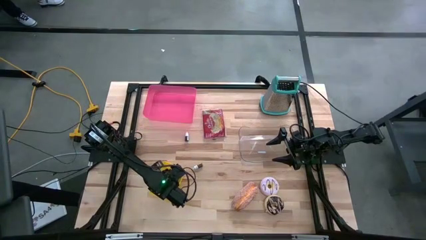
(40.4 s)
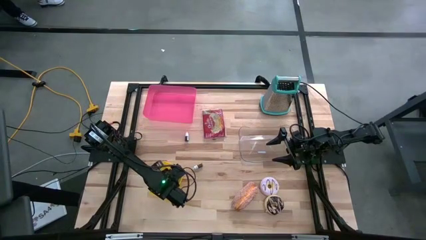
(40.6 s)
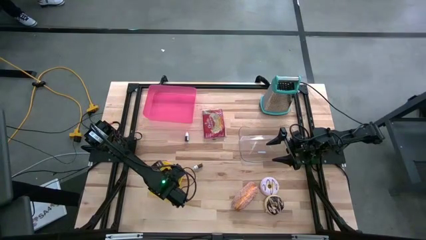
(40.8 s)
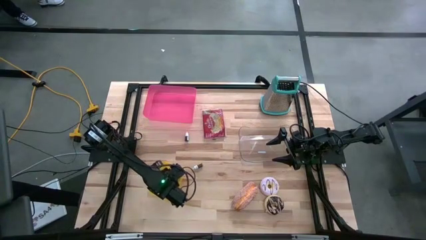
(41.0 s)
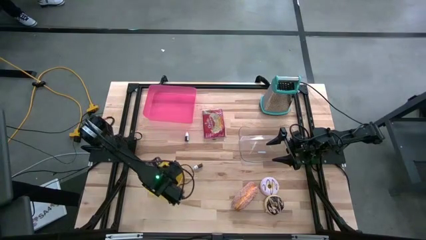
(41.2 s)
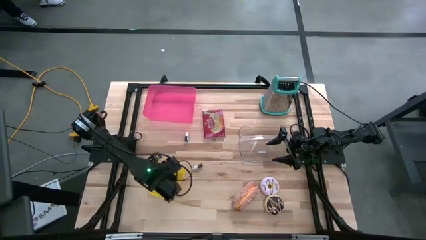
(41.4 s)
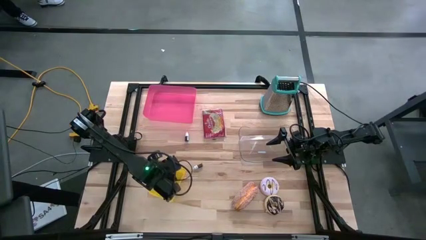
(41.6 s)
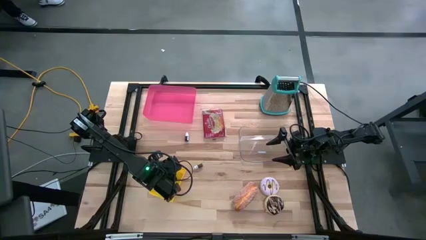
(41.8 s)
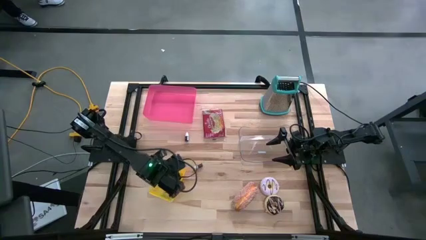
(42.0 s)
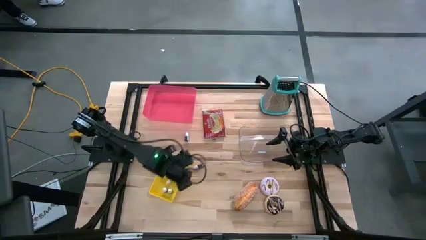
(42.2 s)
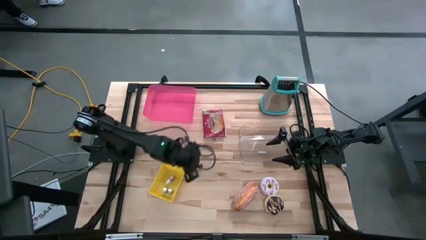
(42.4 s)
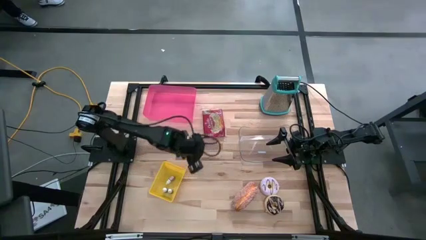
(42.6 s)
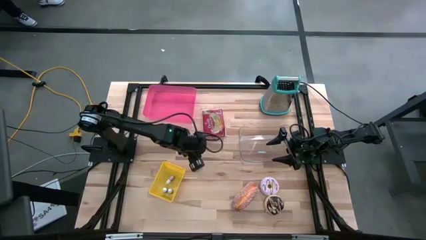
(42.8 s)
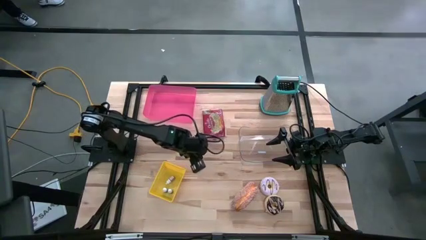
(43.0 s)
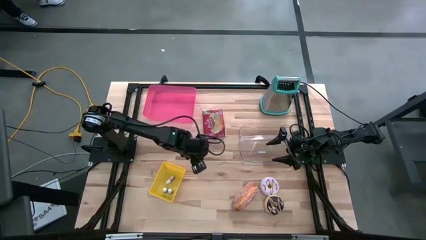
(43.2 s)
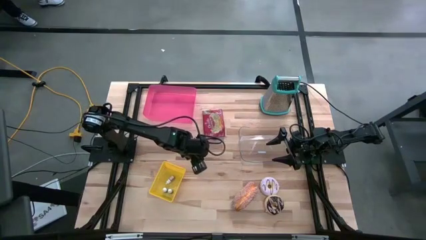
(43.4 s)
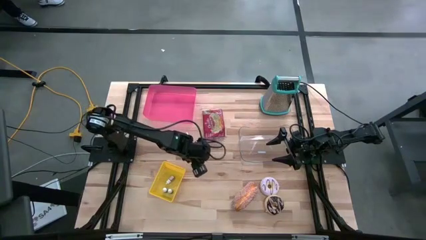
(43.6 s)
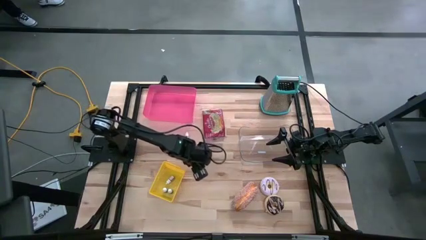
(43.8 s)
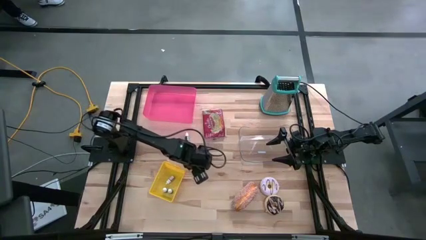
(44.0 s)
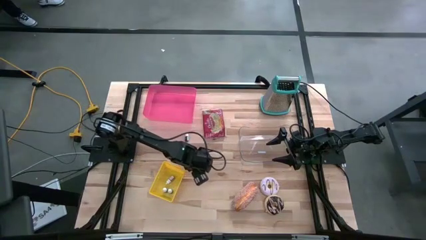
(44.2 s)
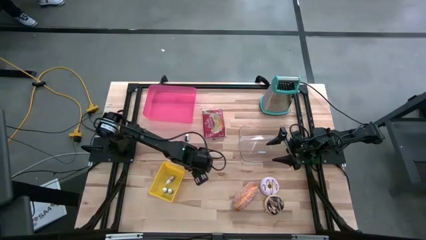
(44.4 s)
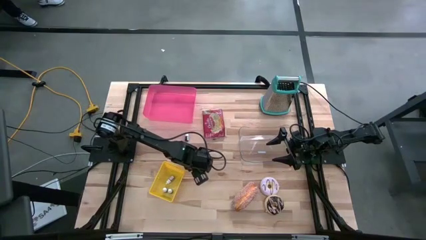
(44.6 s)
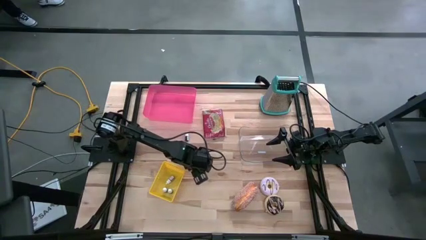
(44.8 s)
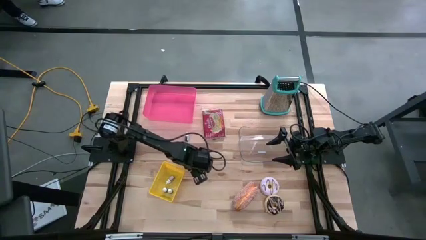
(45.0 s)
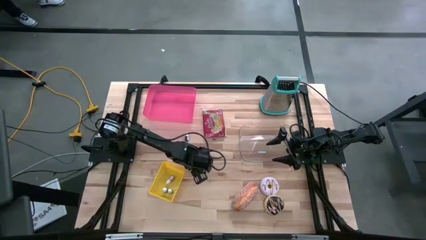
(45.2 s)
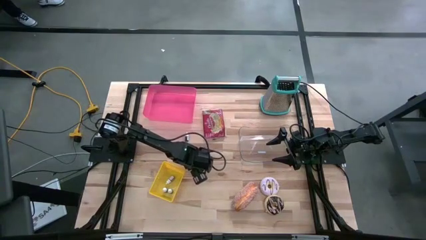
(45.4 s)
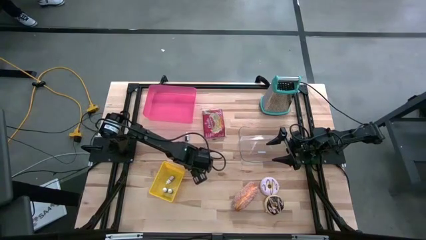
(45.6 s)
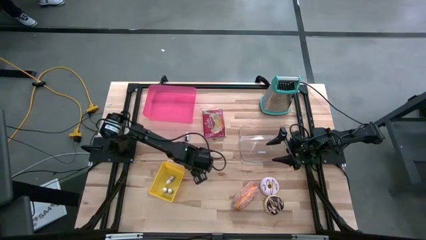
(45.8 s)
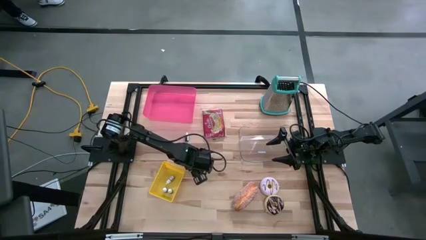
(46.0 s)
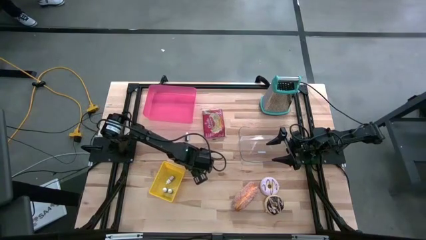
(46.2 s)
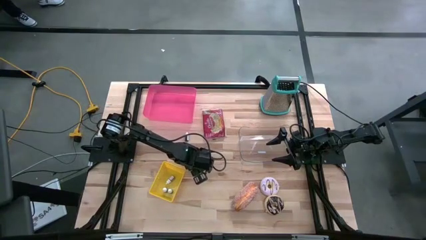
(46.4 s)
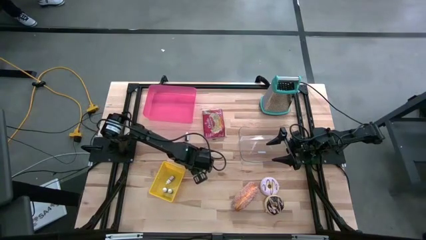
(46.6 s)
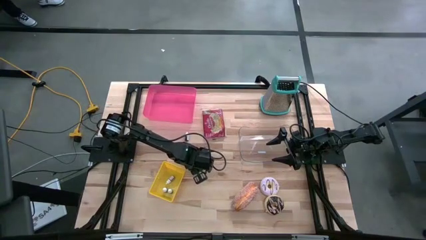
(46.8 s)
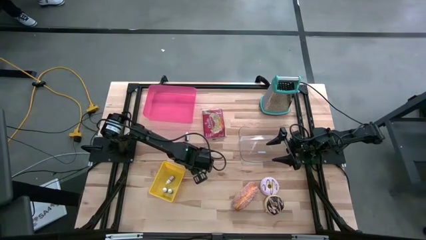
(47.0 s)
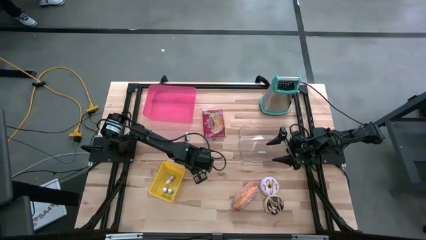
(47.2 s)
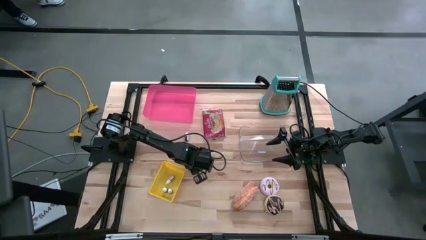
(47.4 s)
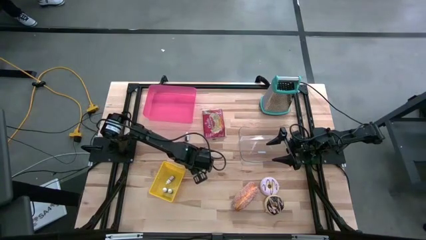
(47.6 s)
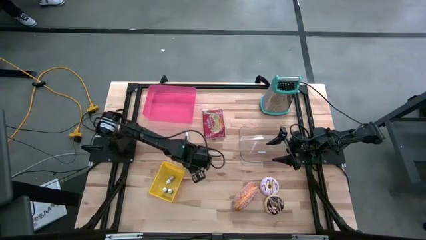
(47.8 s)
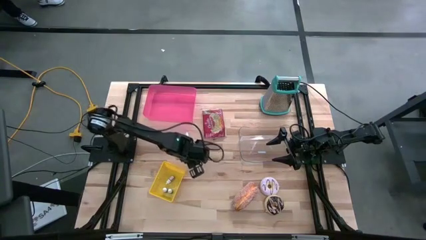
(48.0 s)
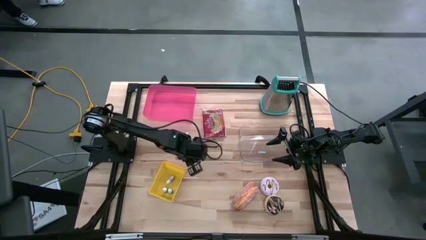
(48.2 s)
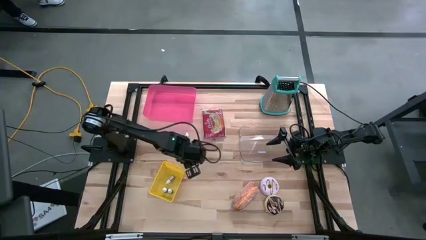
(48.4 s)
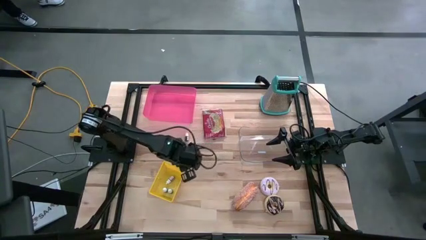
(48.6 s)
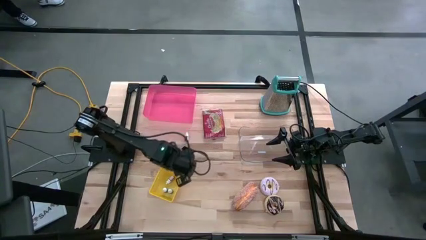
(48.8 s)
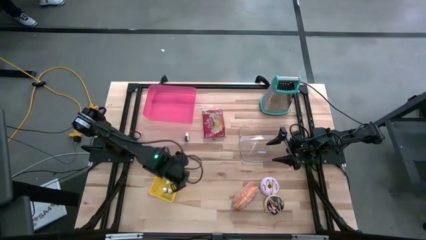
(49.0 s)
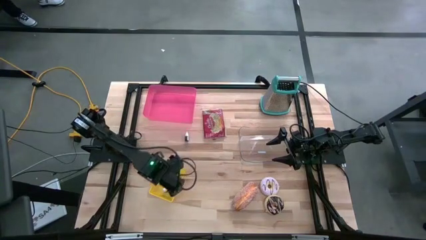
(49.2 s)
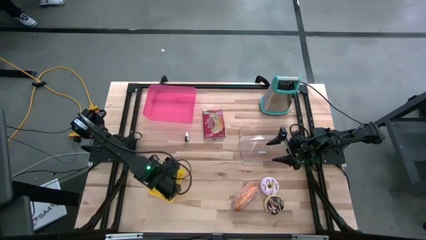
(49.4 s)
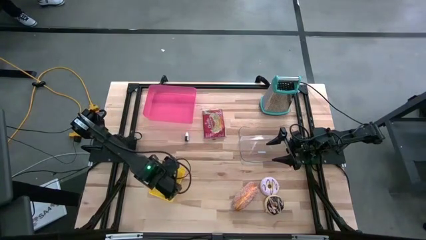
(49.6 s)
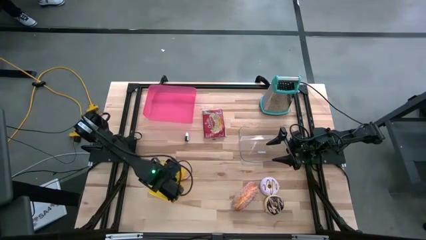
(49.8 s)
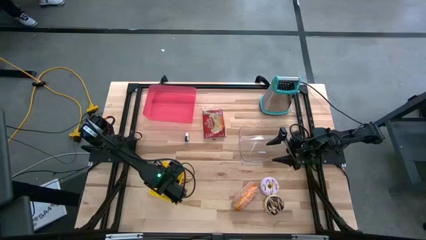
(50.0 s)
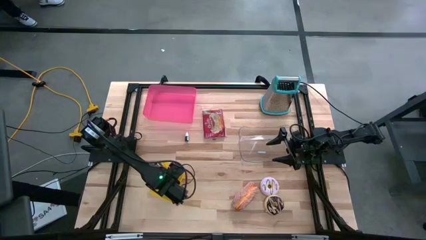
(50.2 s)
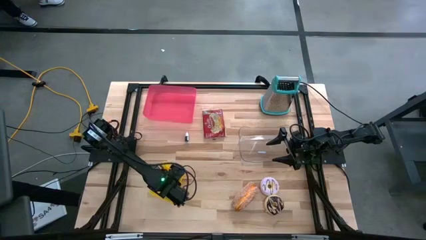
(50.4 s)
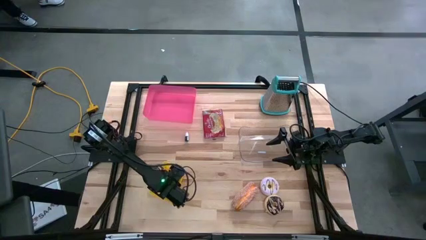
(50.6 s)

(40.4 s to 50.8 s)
Put the yellow food coloring bottle into the yellow bin
